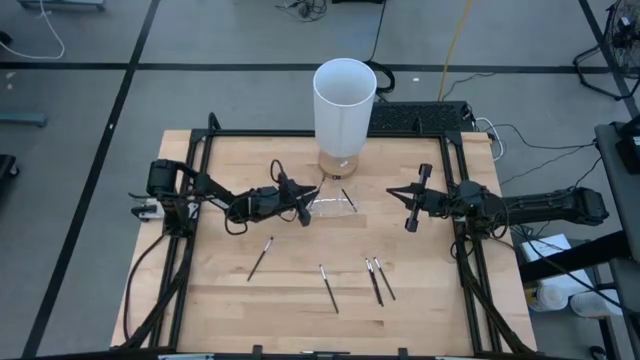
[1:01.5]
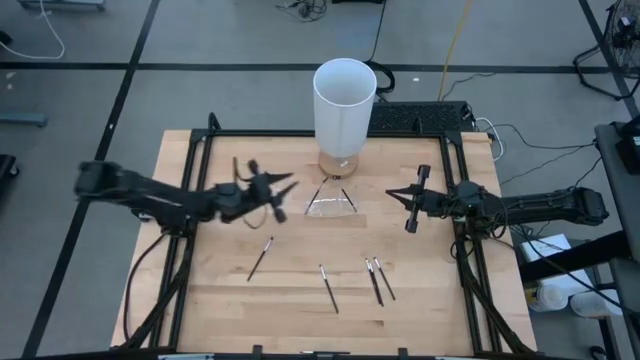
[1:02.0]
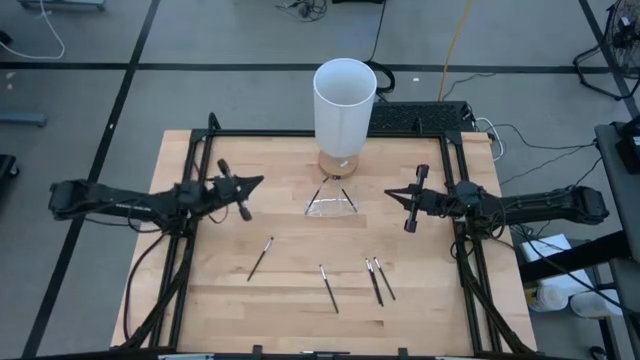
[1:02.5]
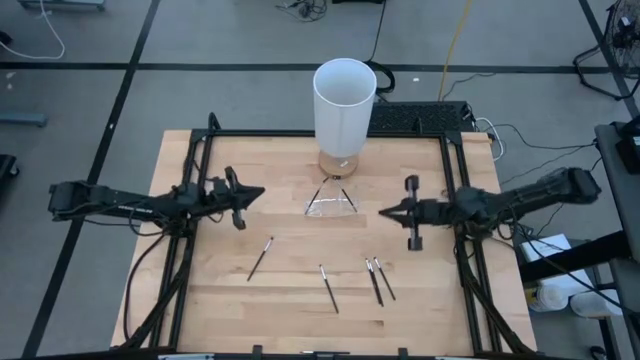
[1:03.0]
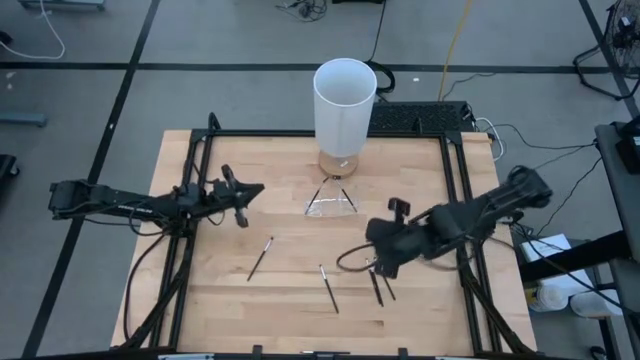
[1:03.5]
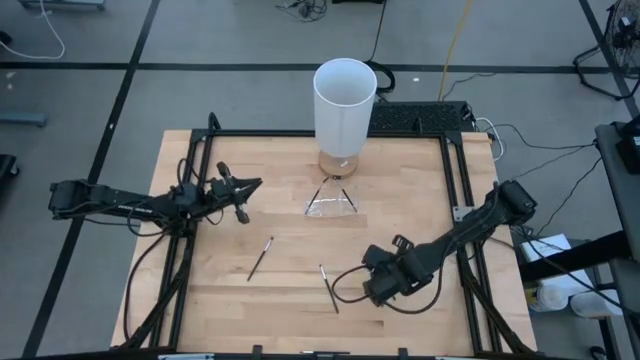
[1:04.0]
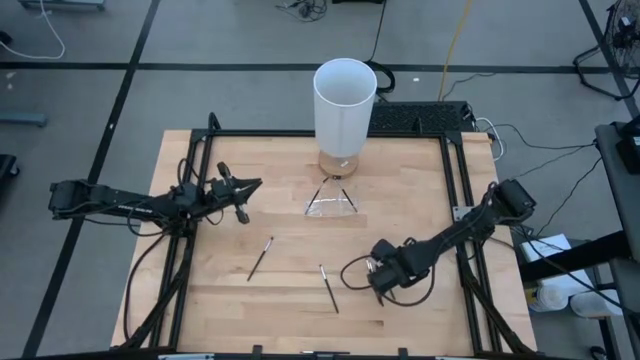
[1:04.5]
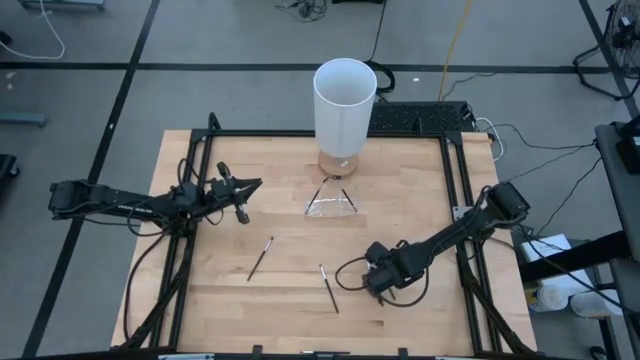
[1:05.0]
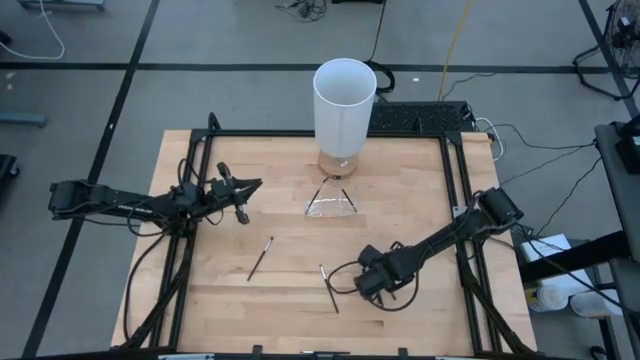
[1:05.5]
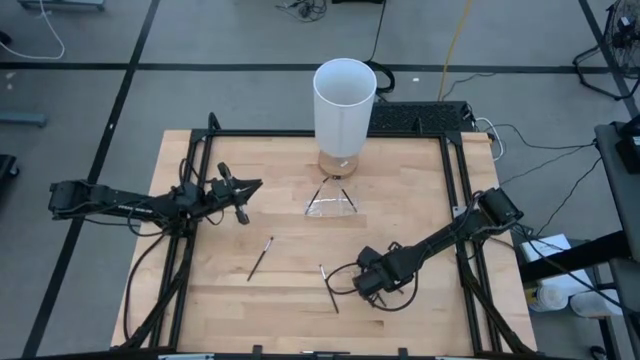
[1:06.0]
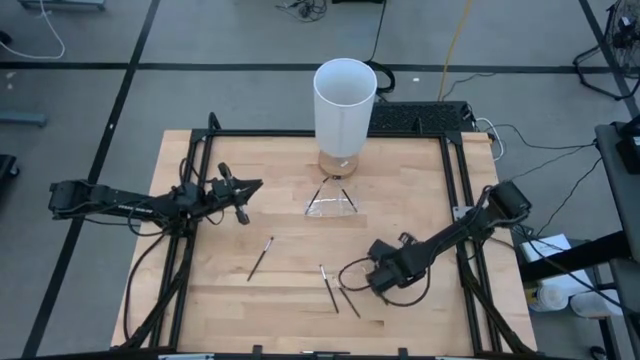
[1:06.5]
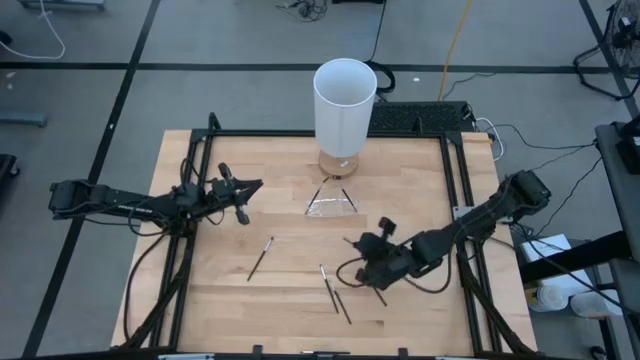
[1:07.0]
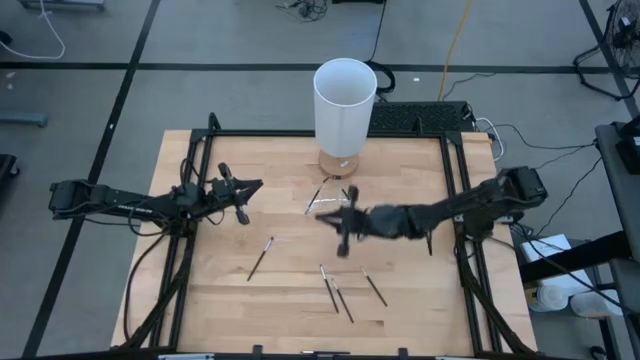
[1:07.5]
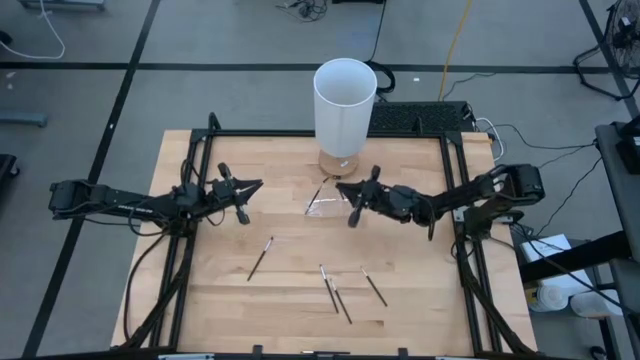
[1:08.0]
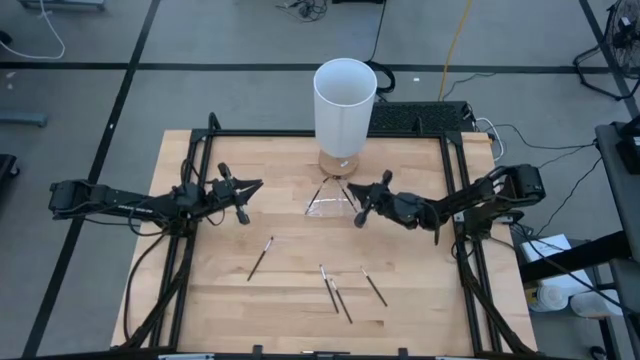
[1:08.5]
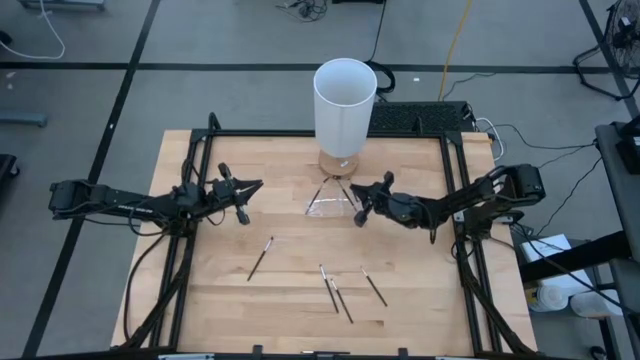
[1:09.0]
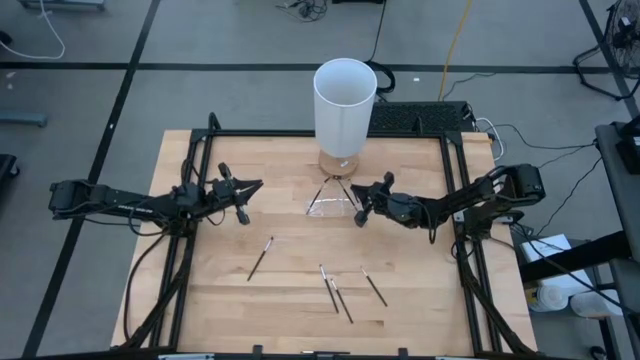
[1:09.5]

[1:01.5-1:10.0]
Task: Put items in baskets/containers
Put the eyeshadow brush into the transparent organizer

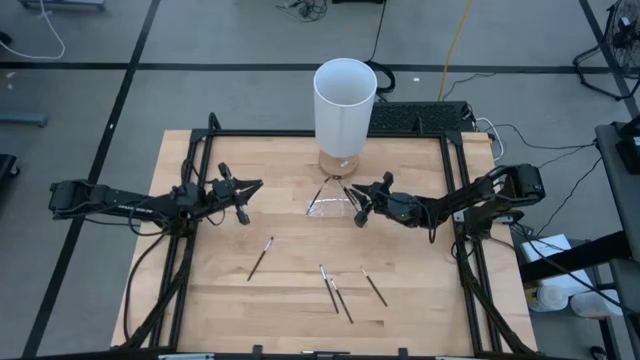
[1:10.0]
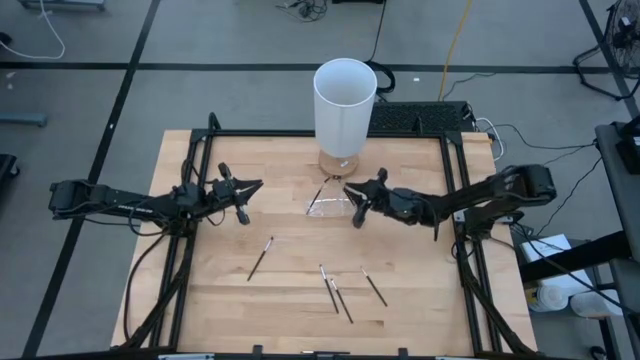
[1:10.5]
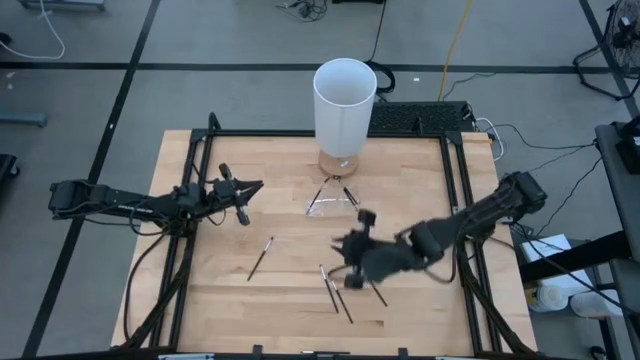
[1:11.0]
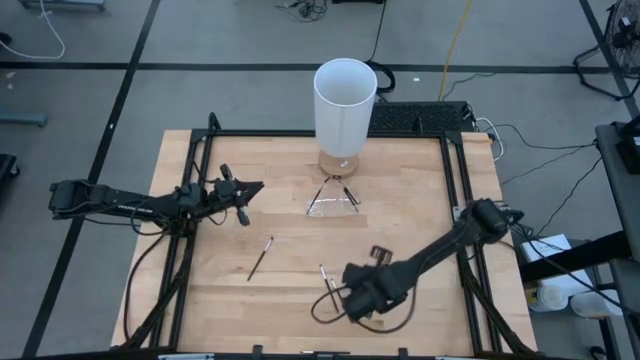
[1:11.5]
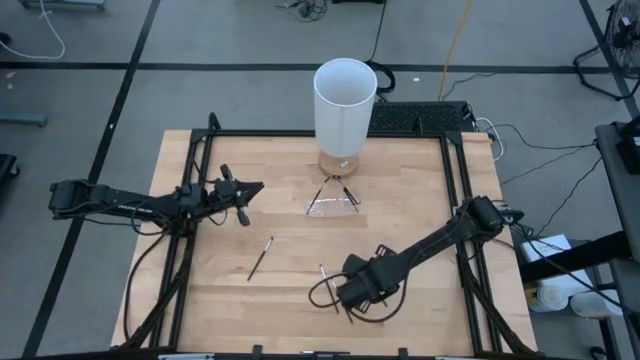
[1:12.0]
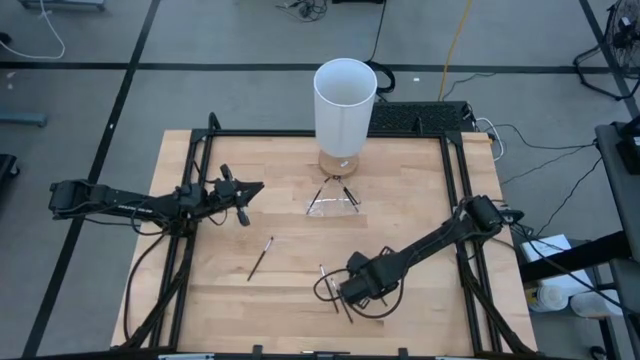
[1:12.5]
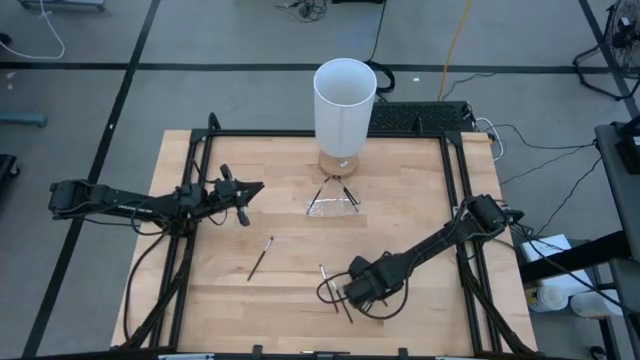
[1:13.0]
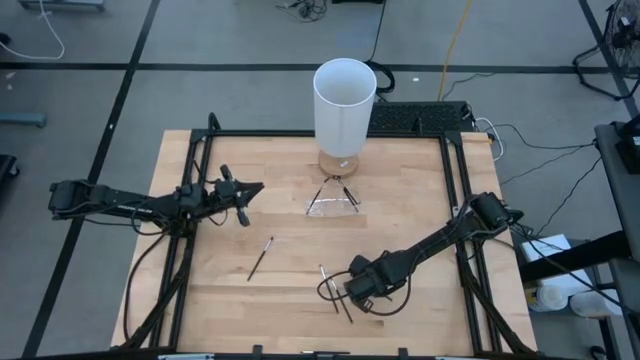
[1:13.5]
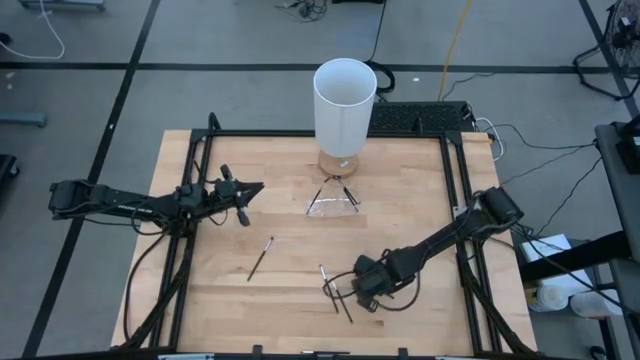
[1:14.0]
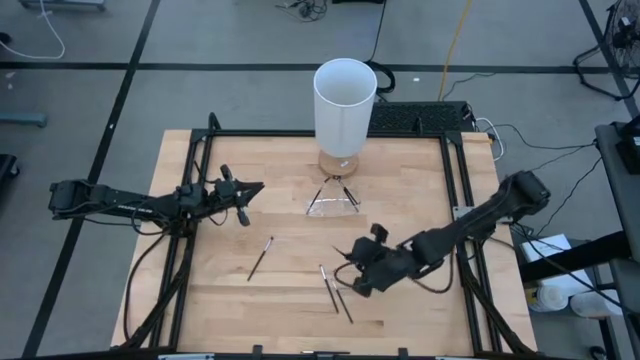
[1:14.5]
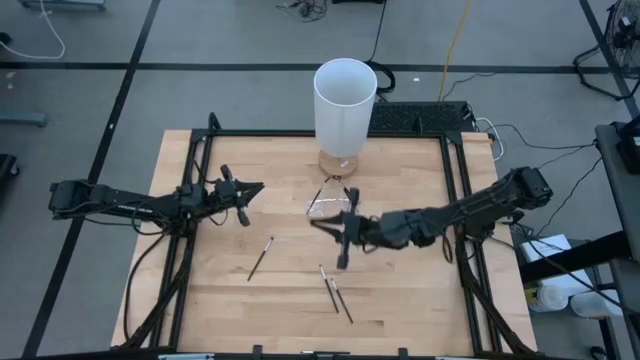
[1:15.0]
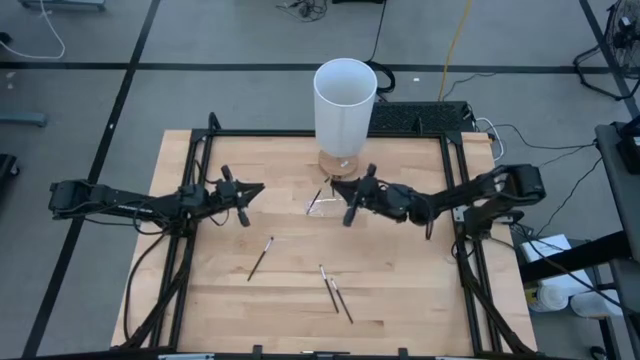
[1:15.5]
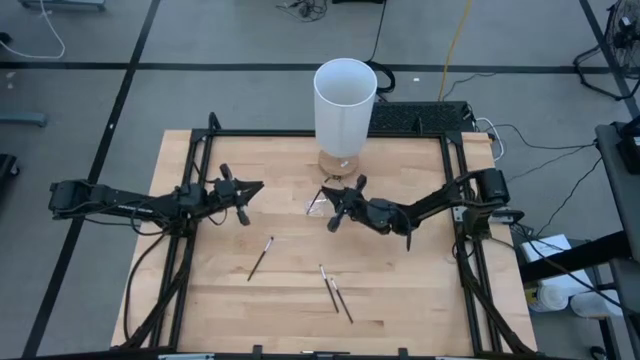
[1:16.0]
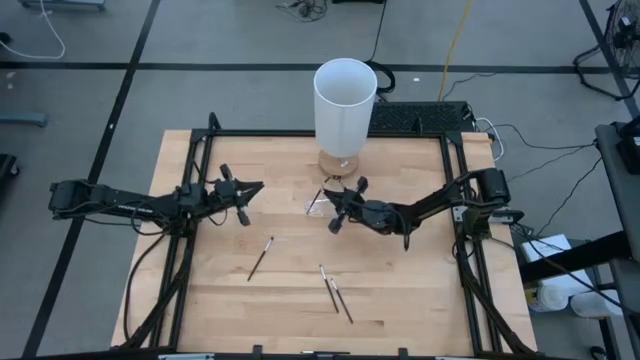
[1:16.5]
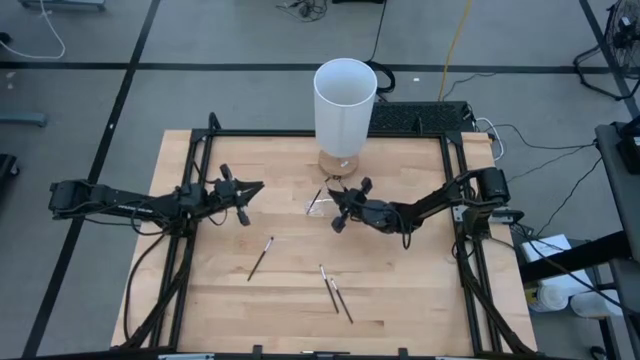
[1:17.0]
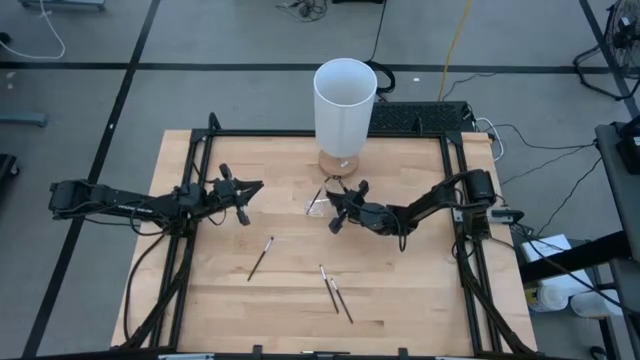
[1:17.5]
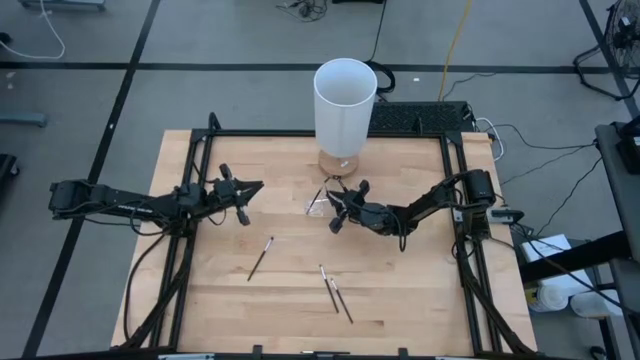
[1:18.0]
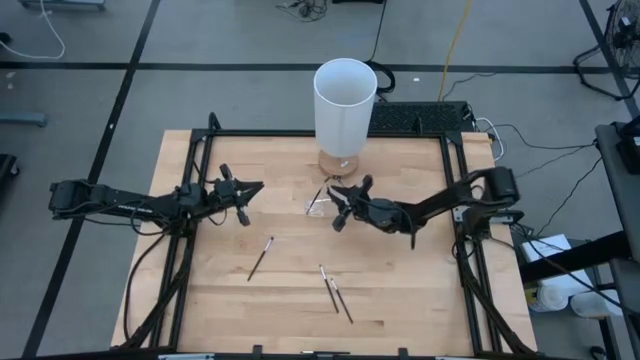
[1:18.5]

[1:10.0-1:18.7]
Put the liner brush into the transparent organizer

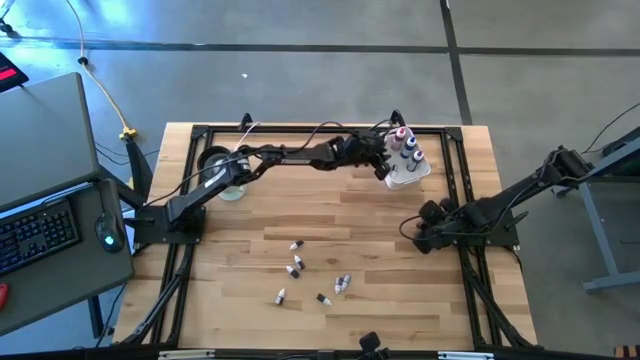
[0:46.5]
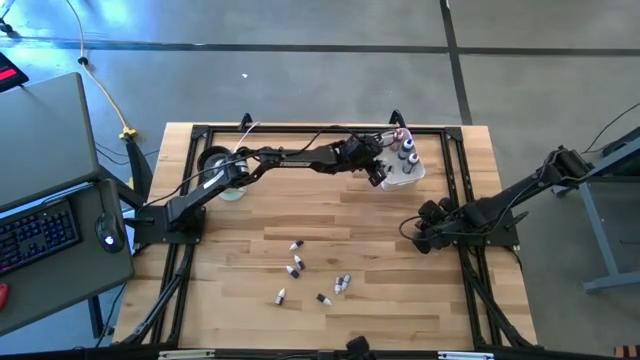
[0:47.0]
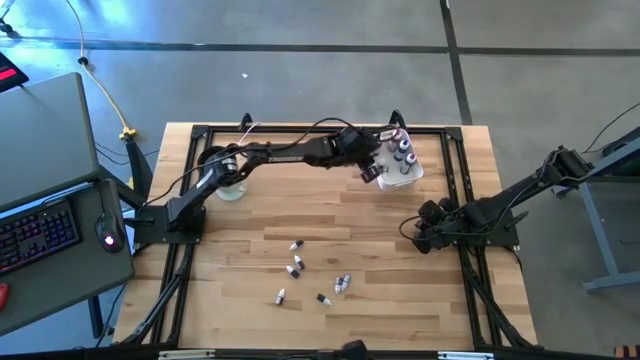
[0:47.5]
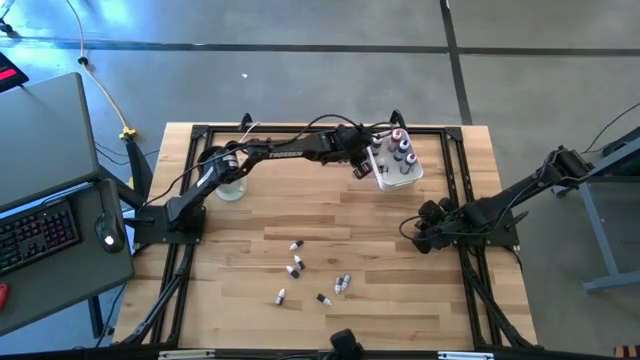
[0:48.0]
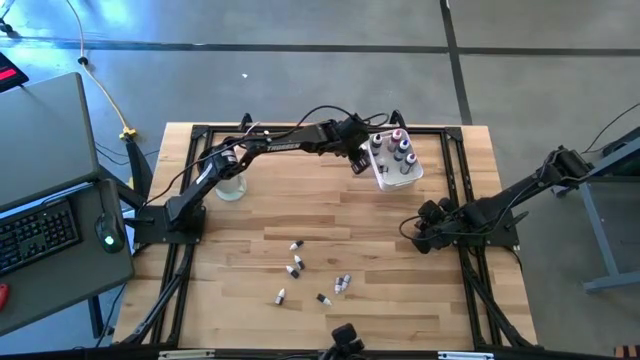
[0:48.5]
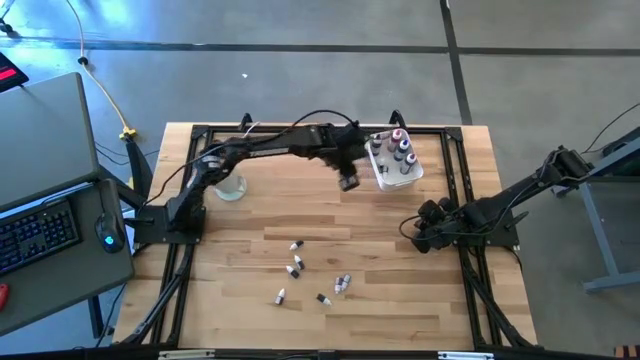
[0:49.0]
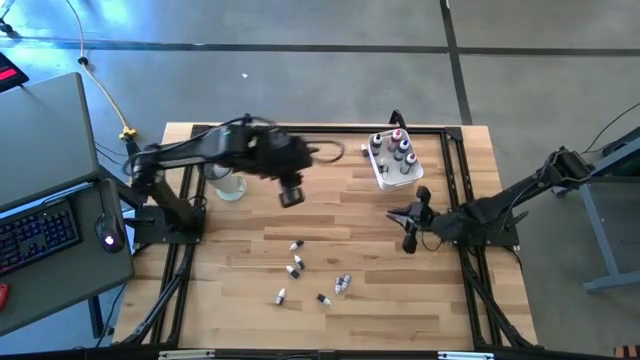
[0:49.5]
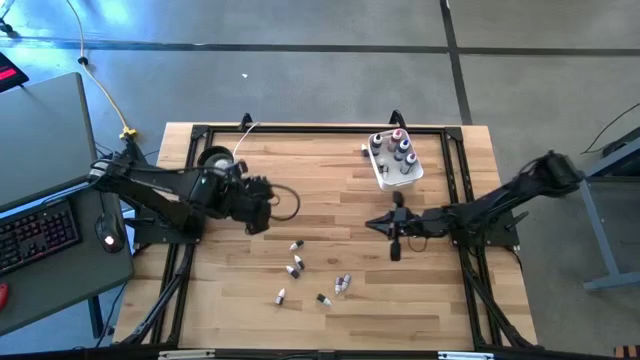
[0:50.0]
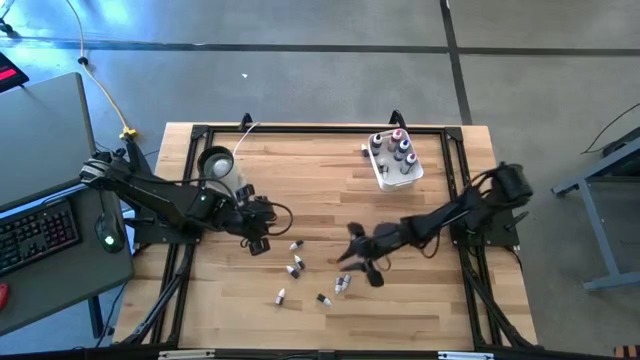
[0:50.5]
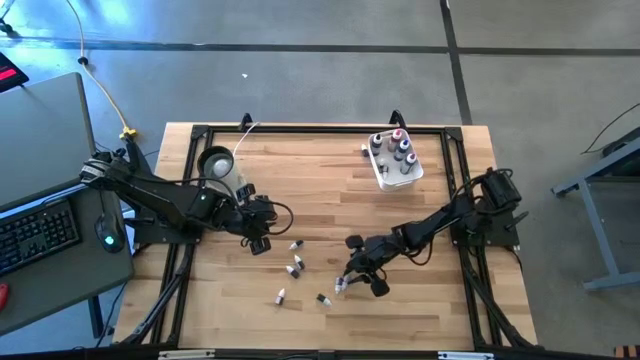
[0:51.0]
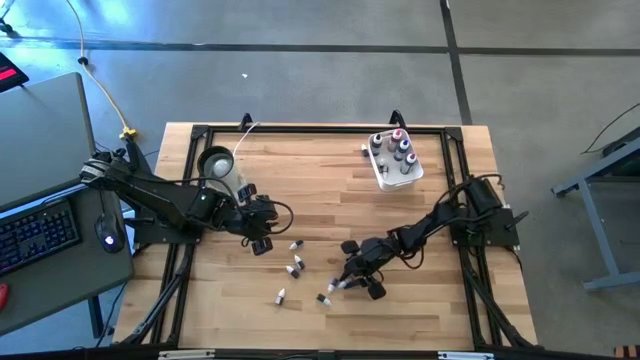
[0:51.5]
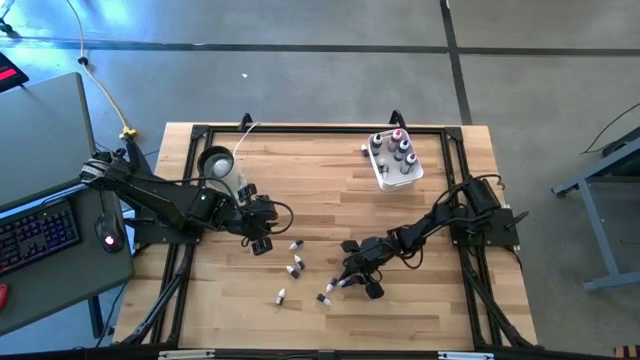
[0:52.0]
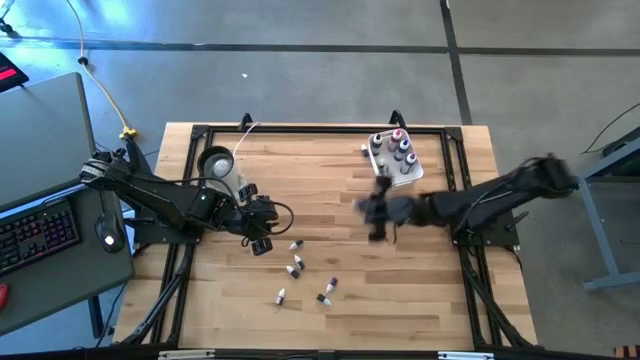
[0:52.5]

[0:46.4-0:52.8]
Task: Pick & Place food coloring
Put the small blue food coloring bottle into the white bin
